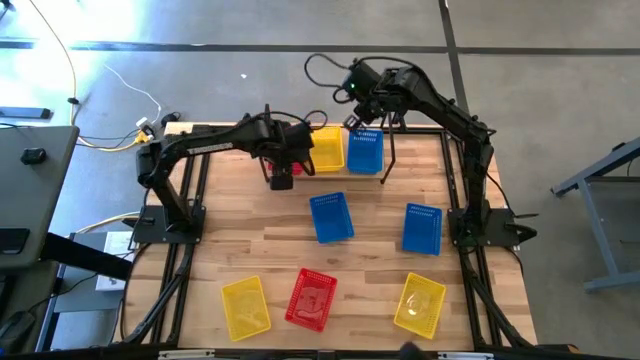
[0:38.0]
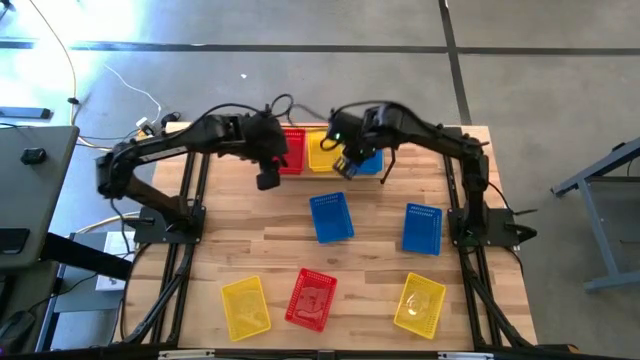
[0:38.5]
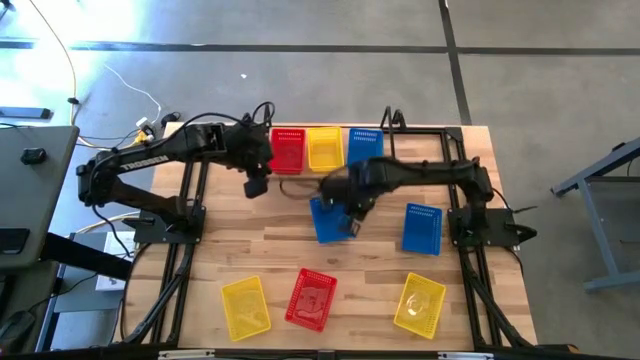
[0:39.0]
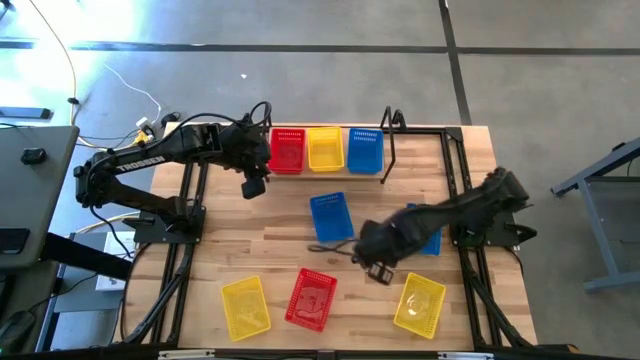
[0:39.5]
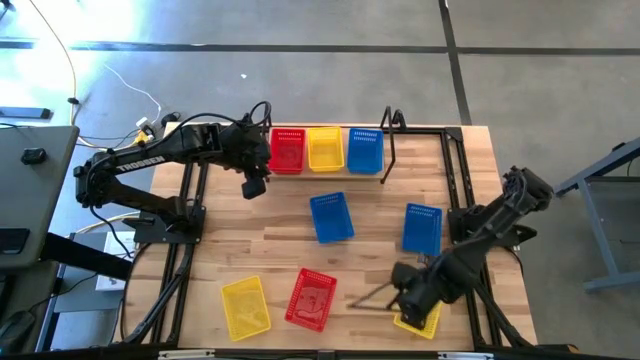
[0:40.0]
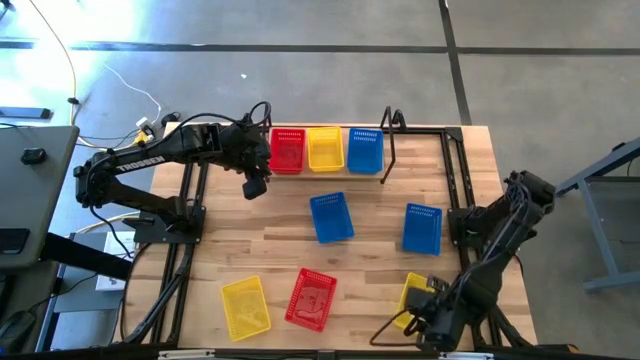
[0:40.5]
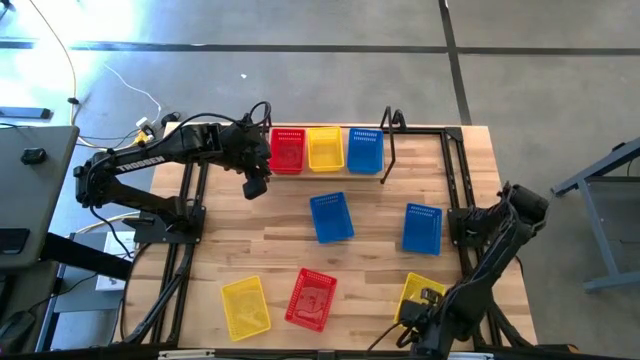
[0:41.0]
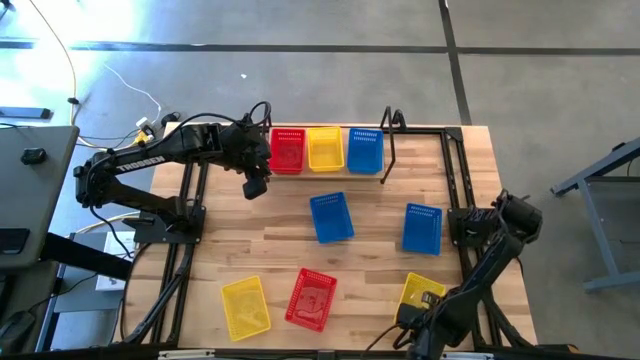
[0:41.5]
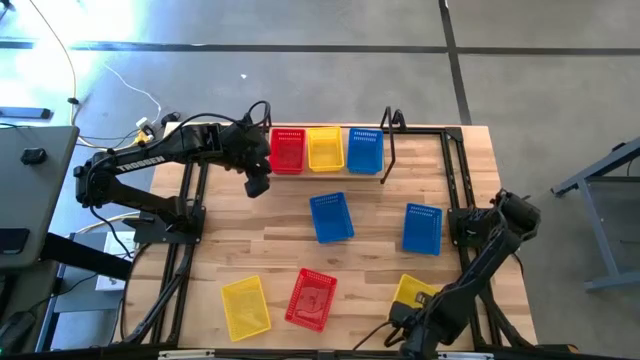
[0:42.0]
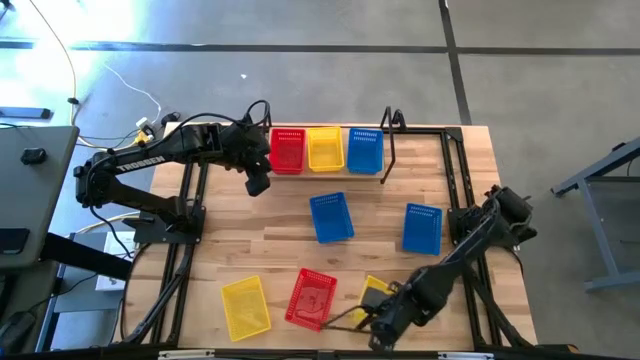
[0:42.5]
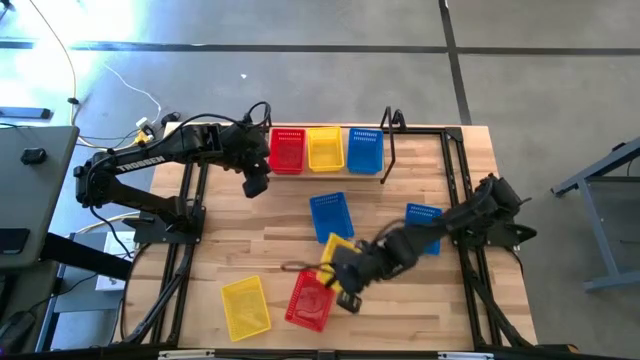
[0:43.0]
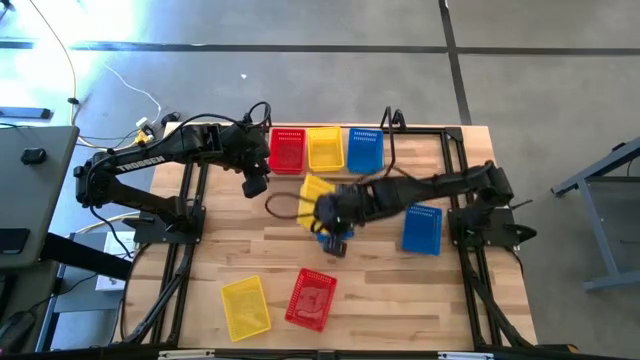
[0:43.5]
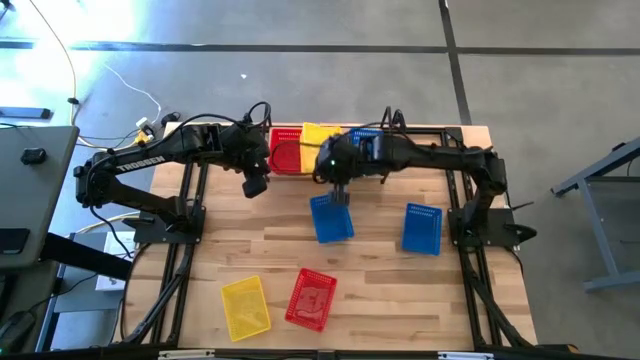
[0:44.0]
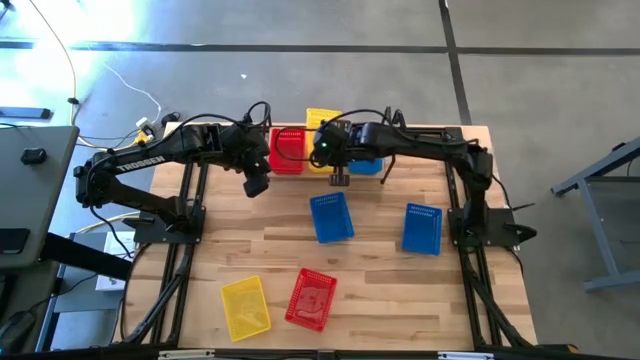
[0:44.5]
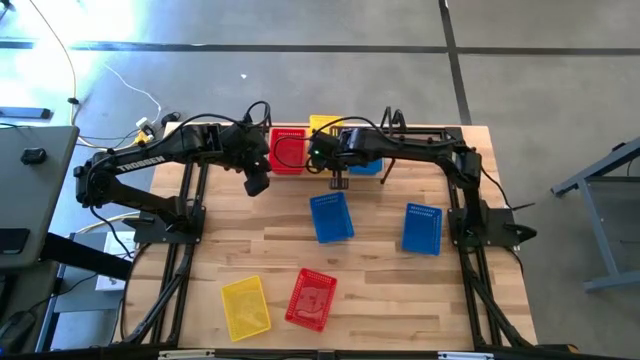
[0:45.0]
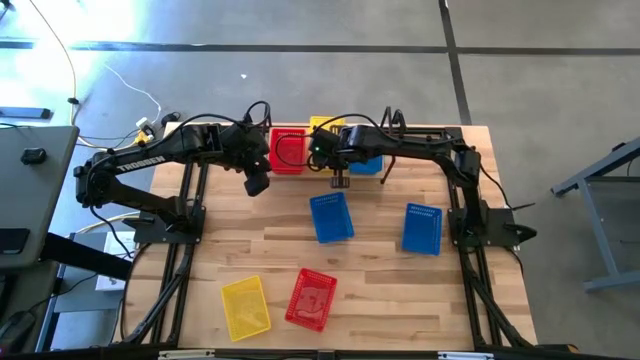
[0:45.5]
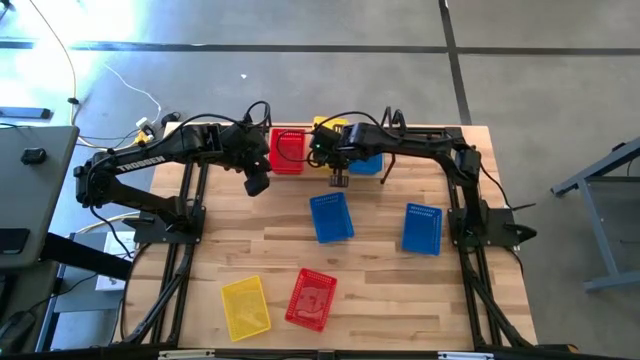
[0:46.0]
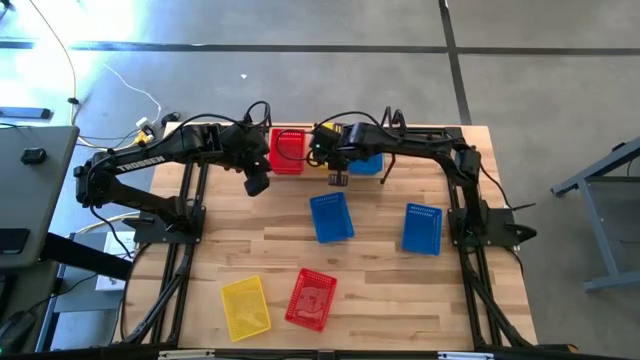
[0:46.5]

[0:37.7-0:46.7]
Task: Stack baskets on shelf by color
Stack the right yellow bin on top of the yellow bin

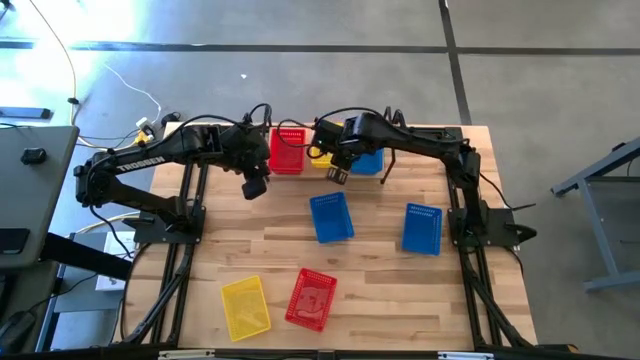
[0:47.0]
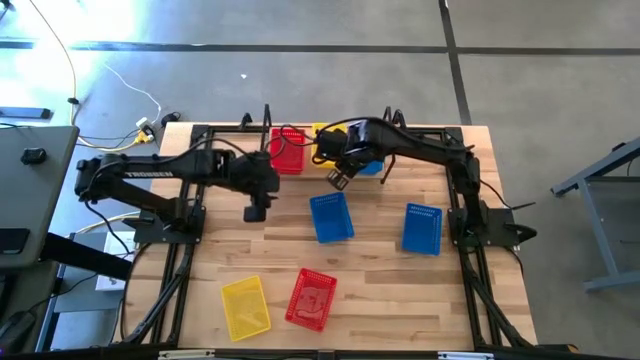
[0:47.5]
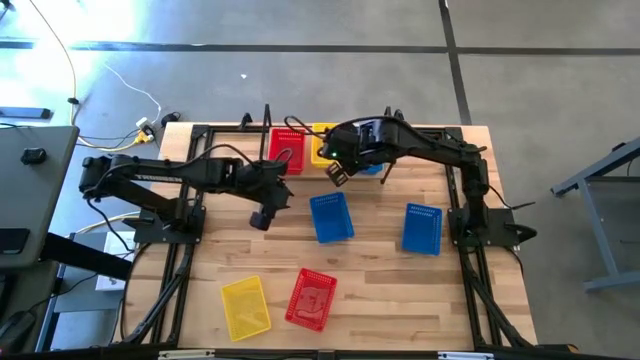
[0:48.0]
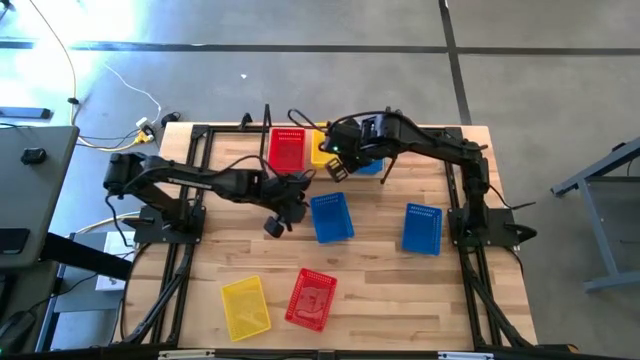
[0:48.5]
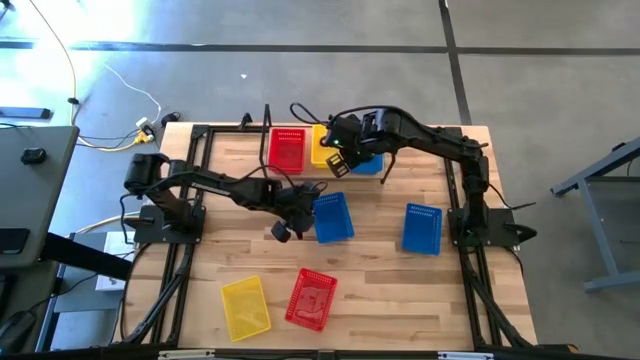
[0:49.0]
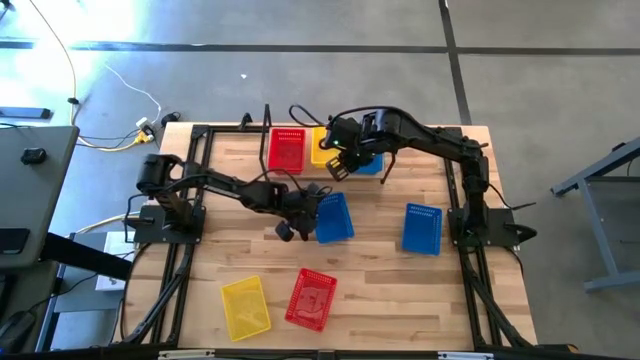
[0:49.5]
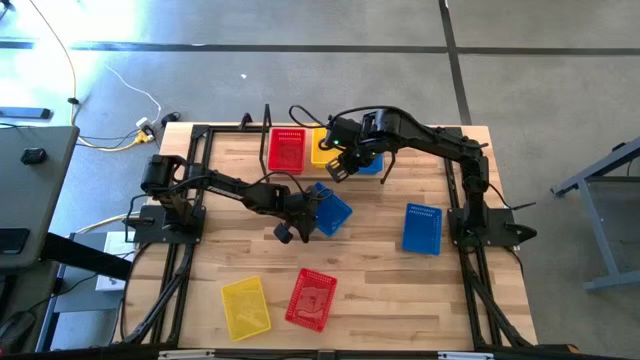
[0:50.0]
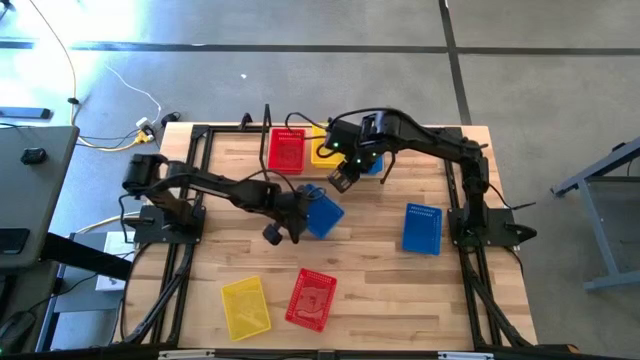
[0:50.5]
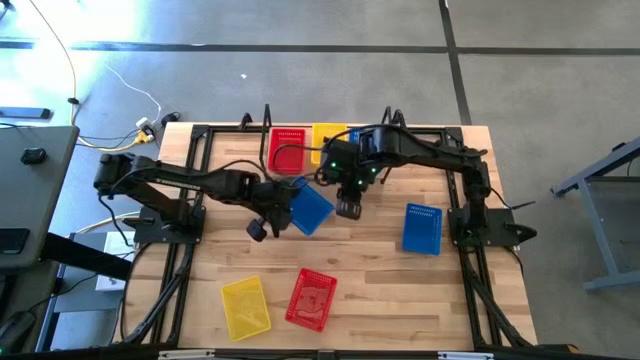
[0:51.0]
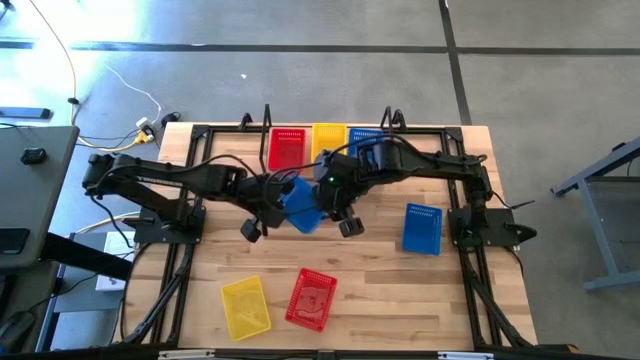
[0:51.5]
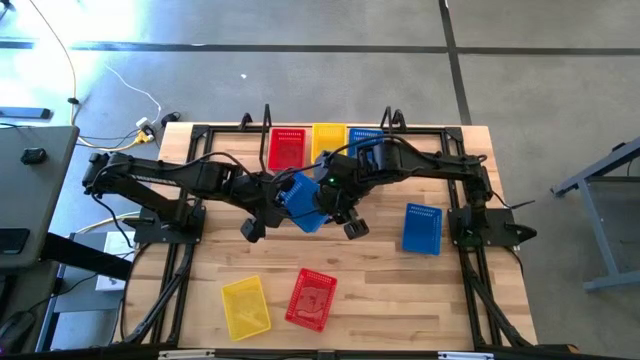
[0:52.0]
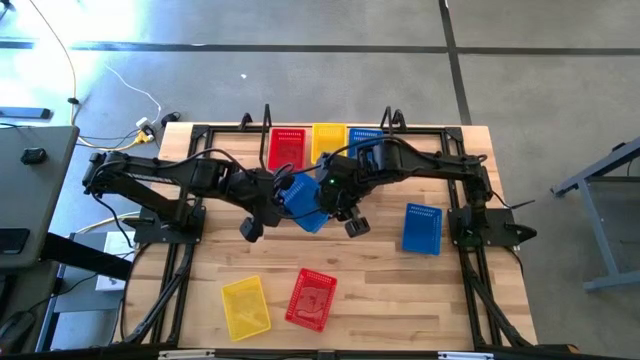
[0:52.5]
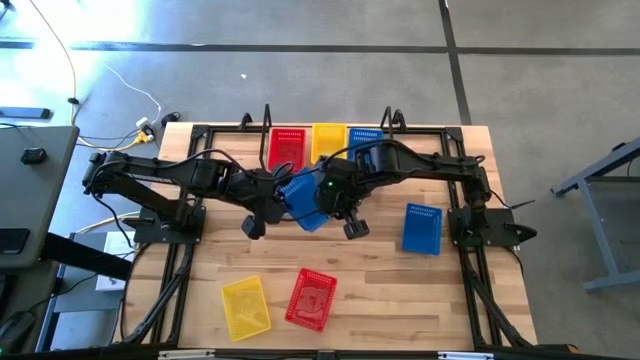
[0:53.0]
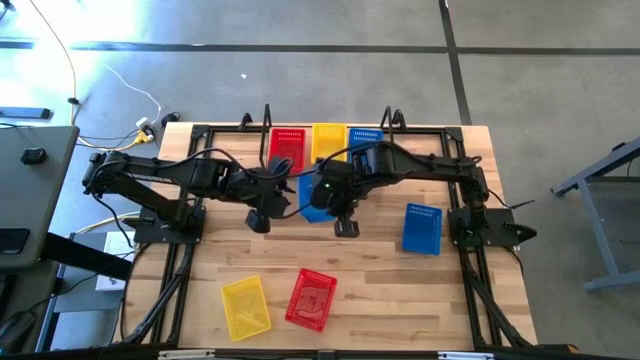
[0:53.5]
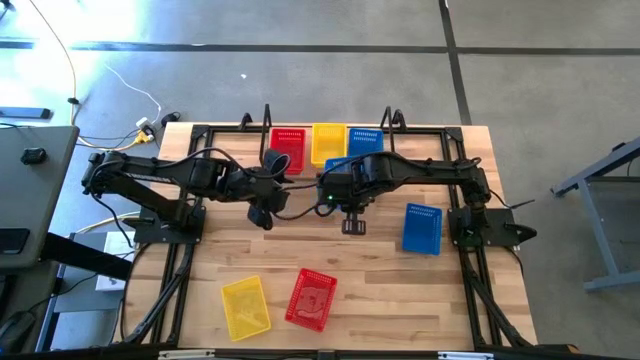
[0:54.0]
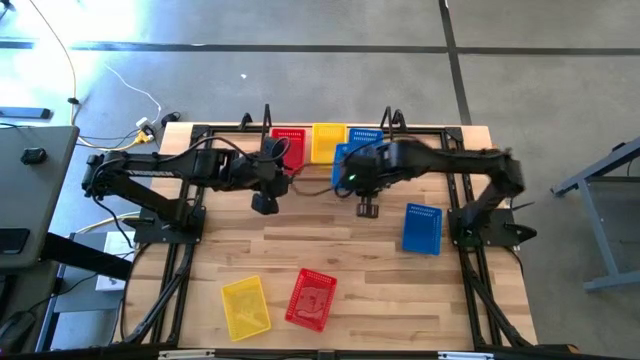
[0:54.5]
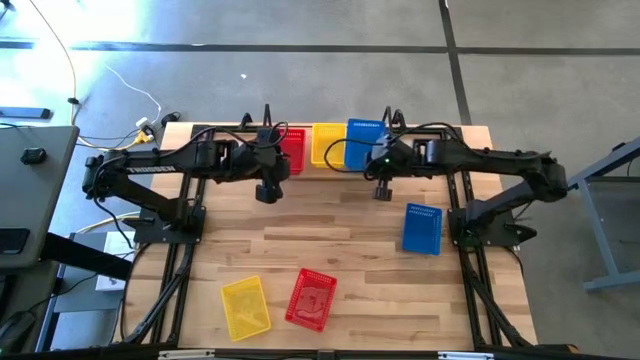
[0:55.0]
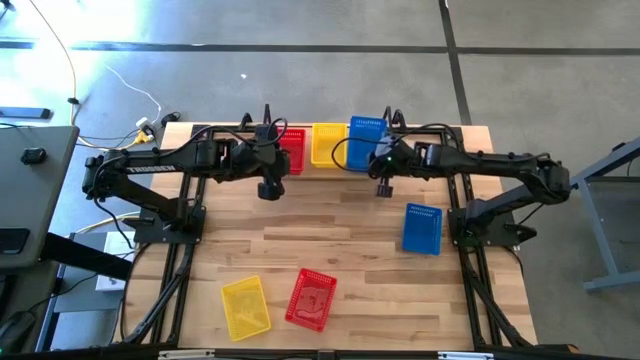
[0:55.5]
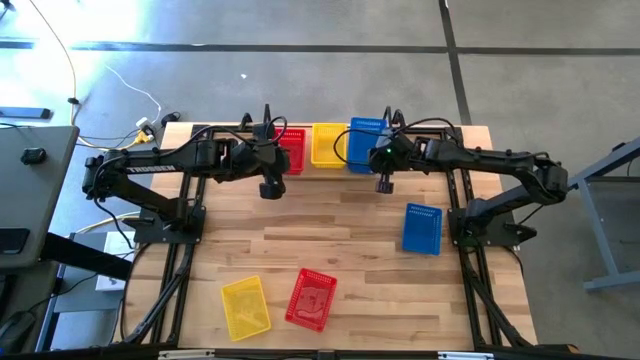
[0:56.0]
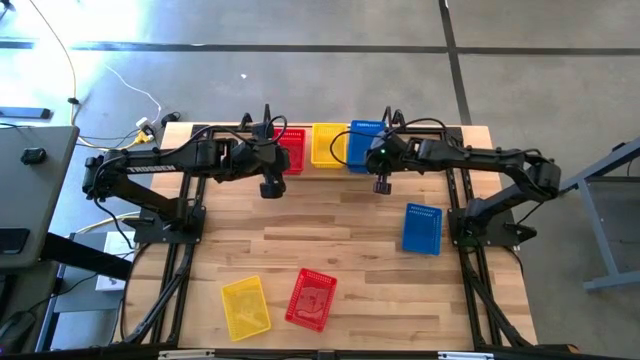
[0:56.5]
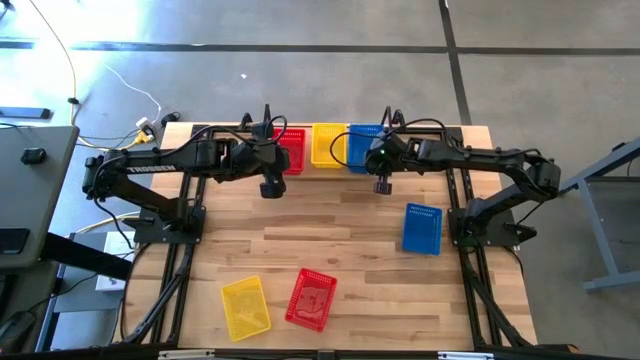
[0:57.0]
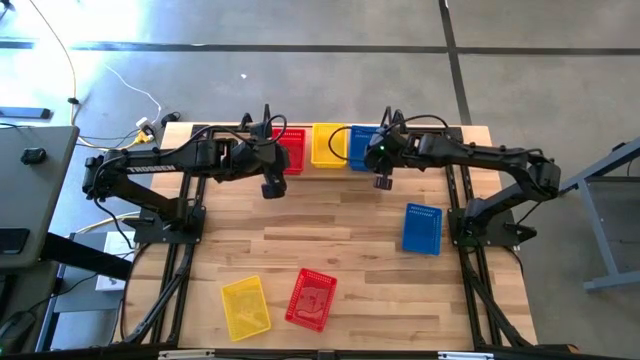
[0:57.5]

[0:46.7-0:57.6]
Stack the left blue bin on top of the blue bin

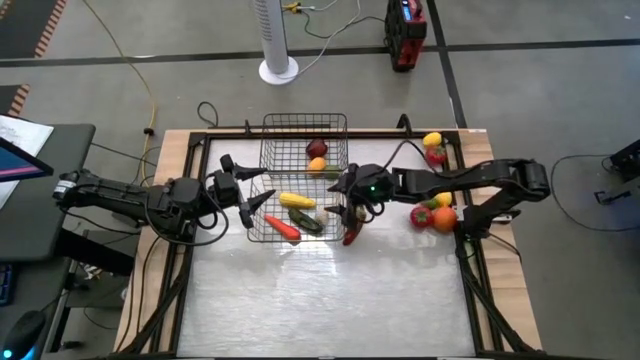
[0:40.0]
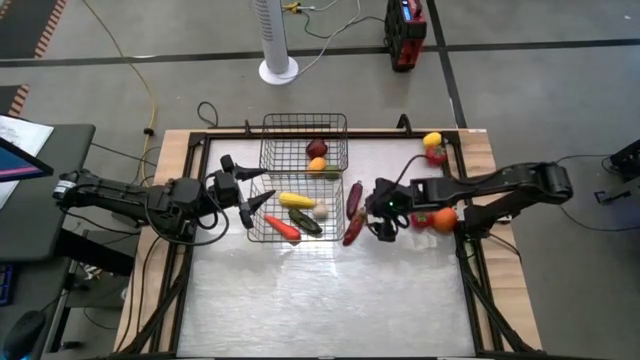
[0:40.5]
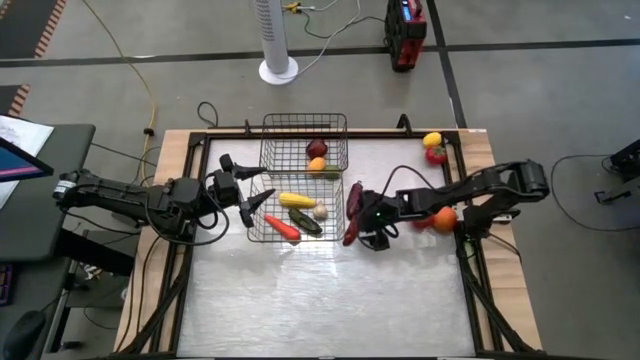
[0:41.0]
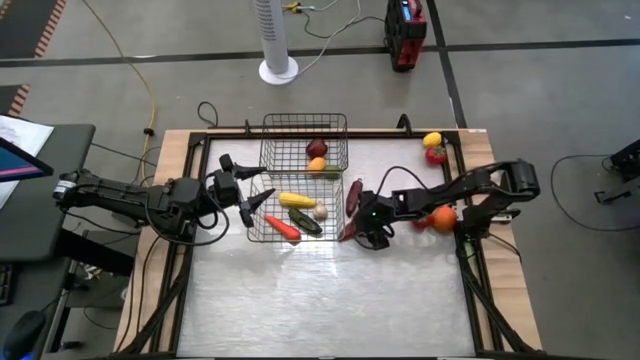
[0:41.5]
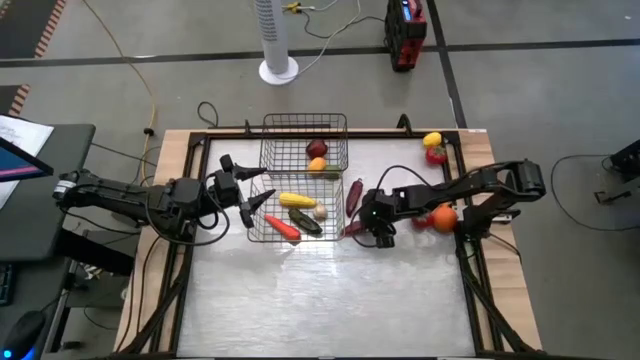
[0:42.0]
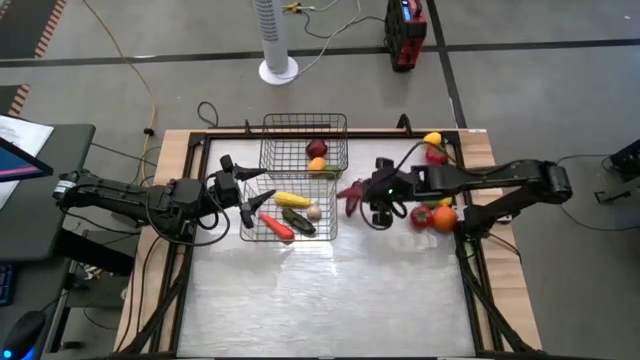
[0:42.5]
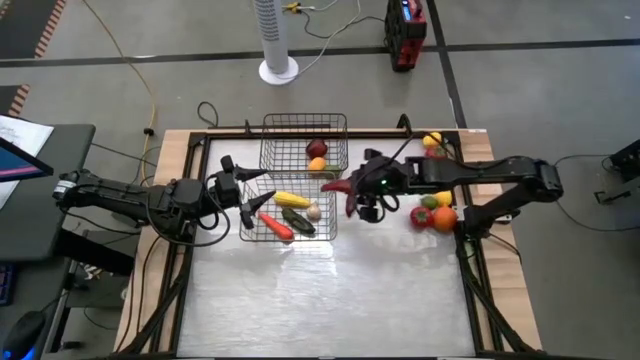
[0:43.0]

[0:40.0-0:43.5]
Task: Sort produce into baskets
Put the bottom red chili pepper into the bottom wire basket
